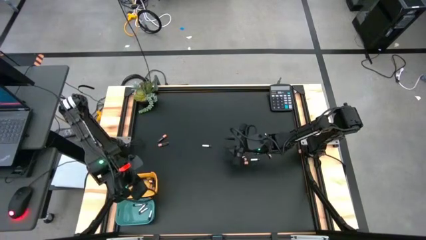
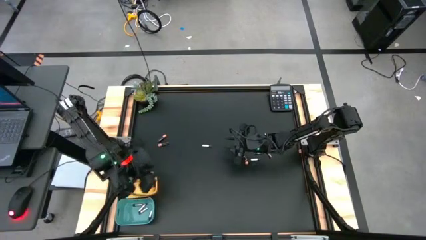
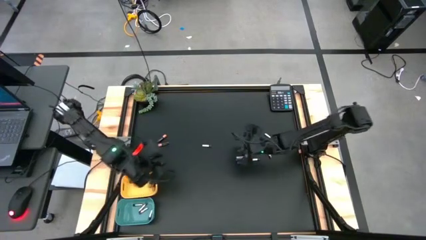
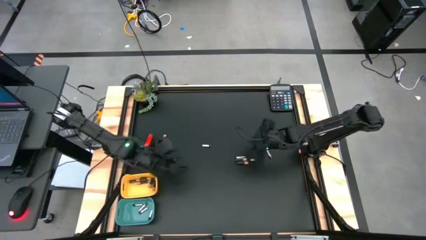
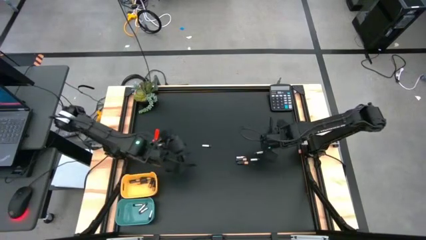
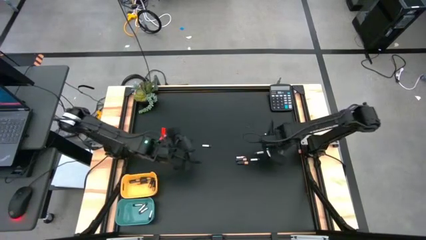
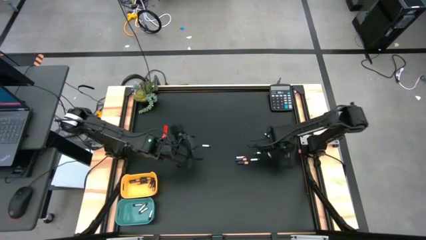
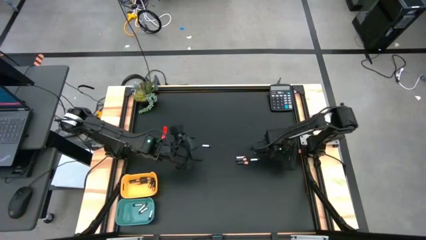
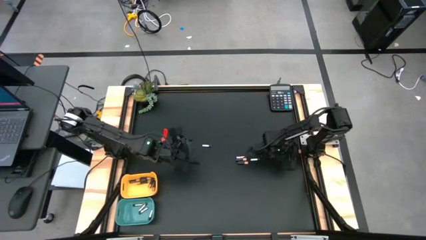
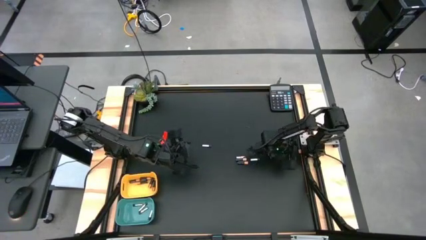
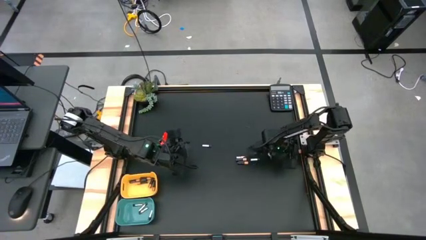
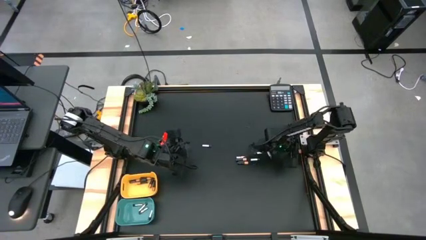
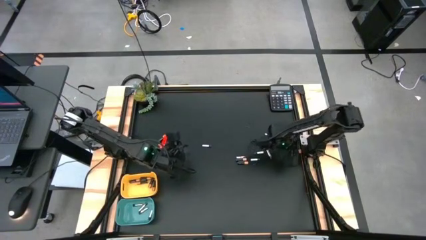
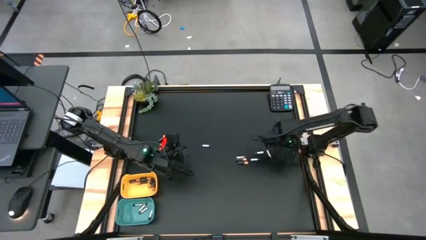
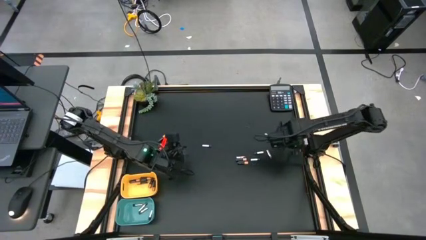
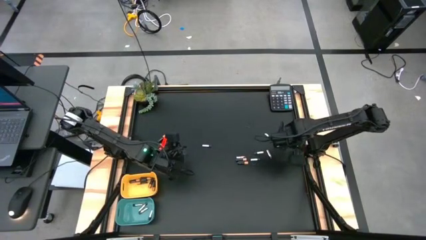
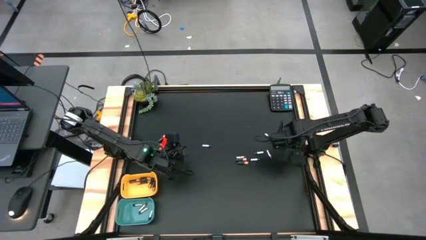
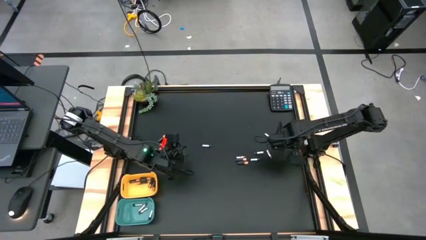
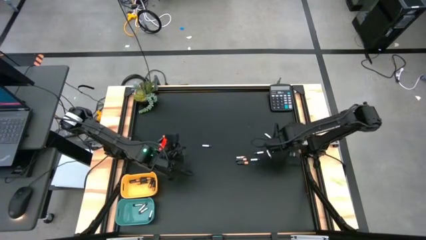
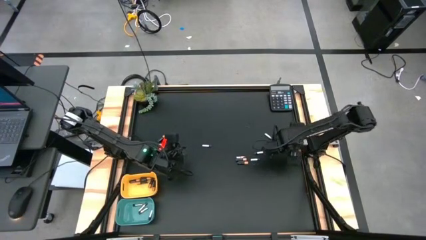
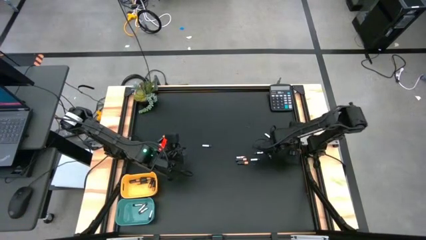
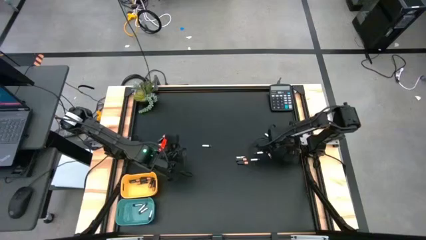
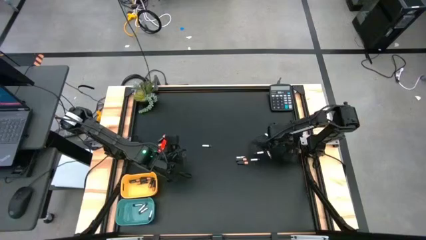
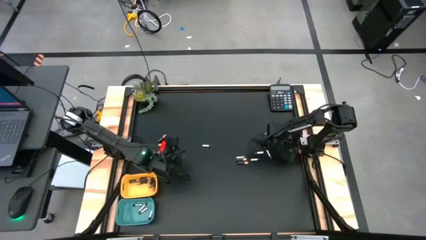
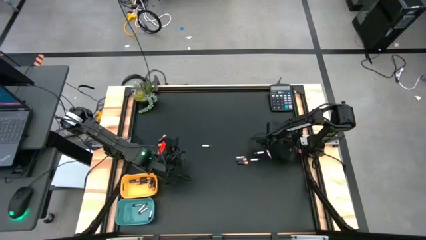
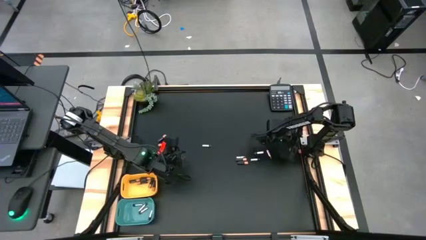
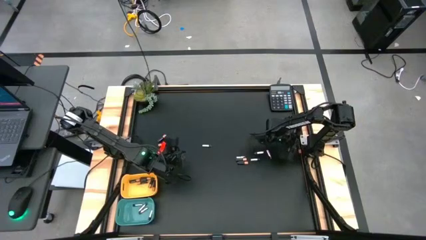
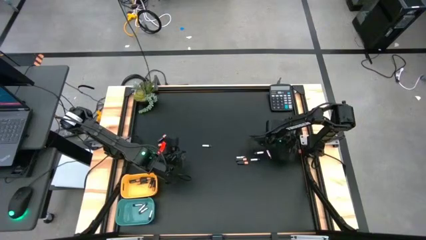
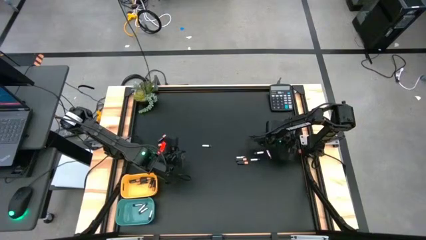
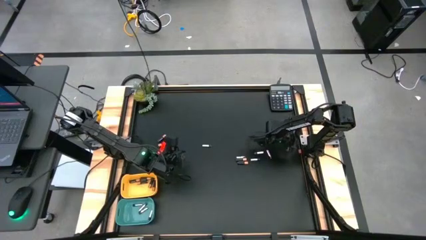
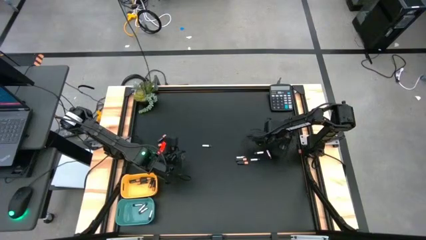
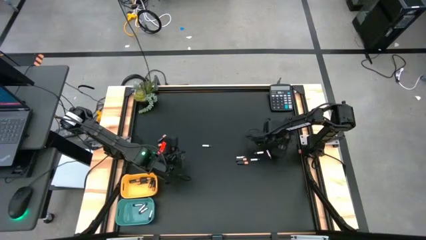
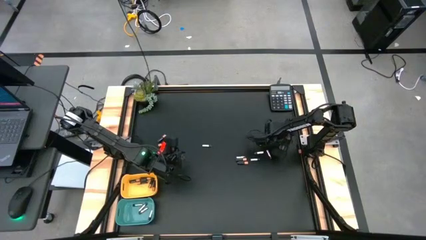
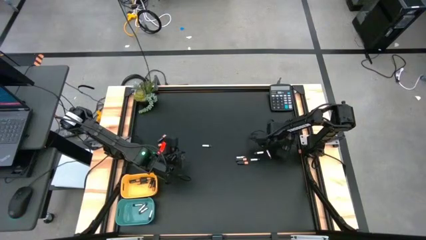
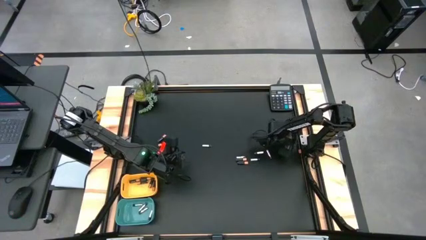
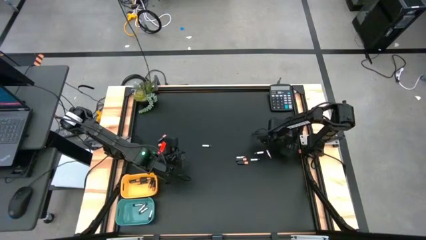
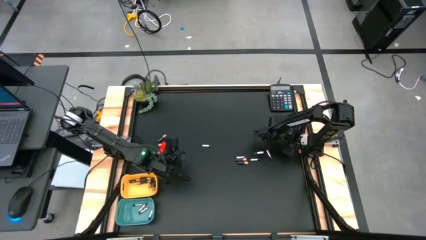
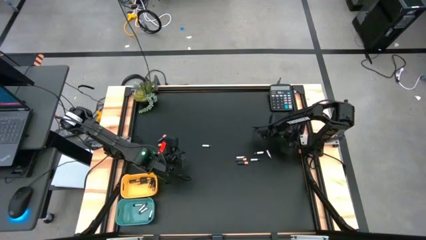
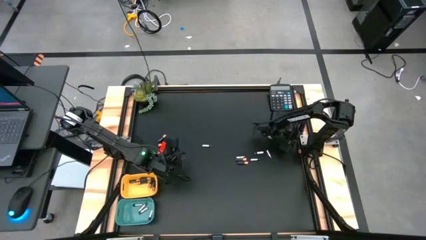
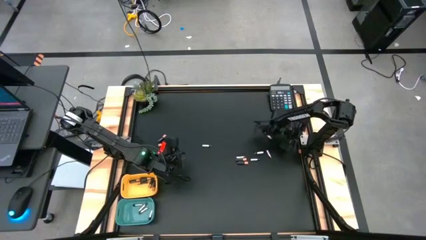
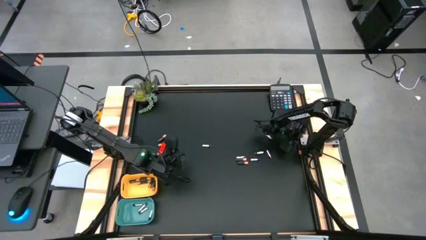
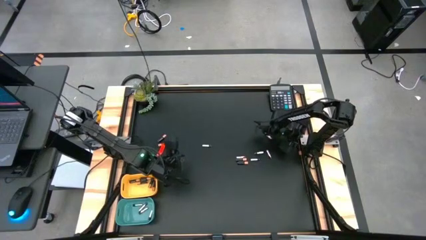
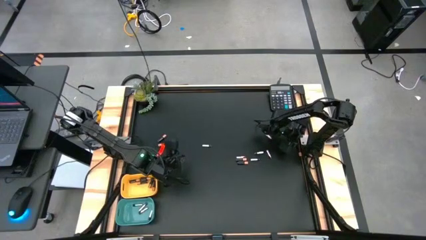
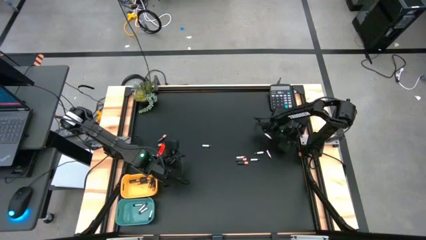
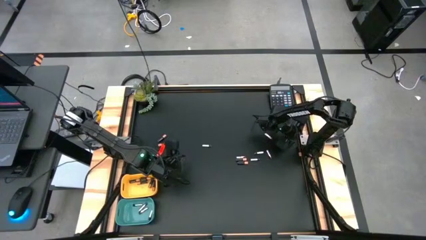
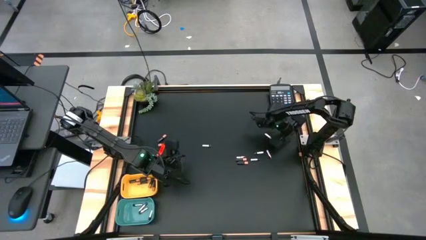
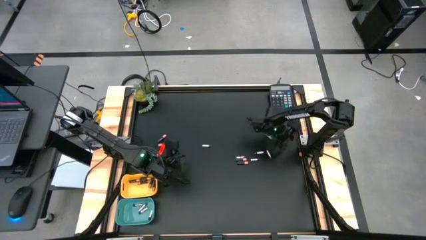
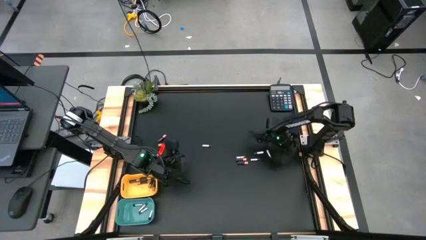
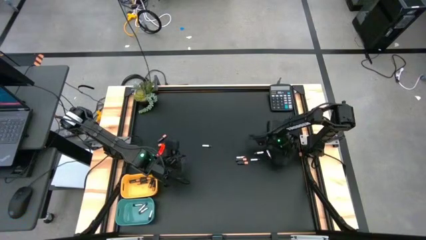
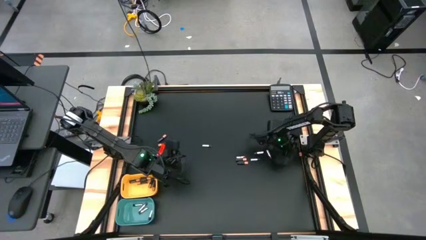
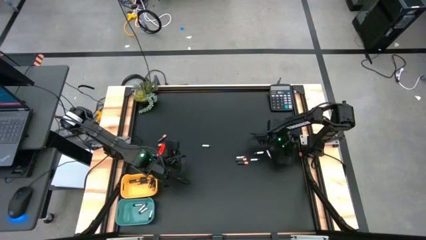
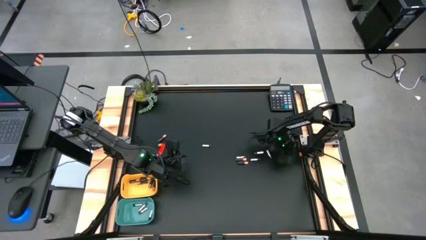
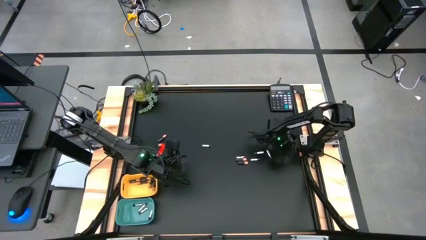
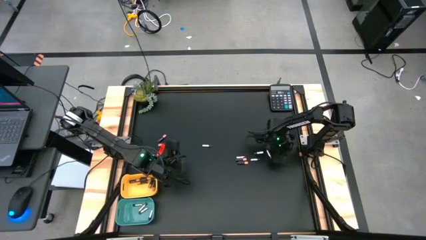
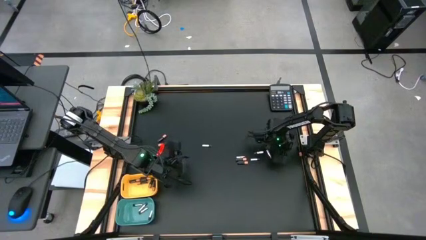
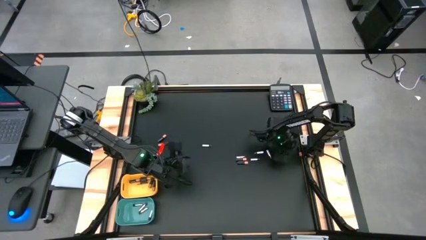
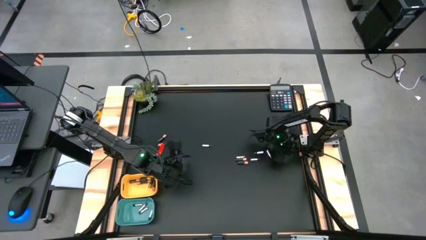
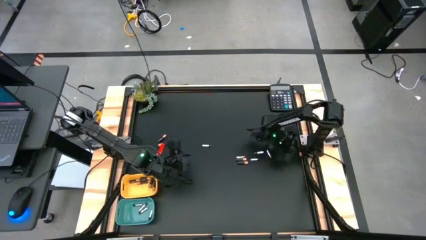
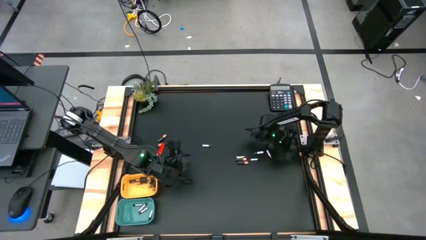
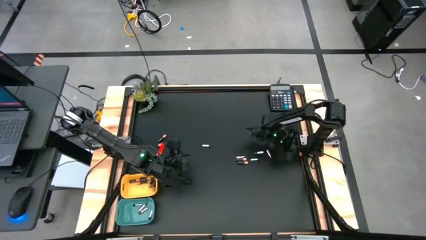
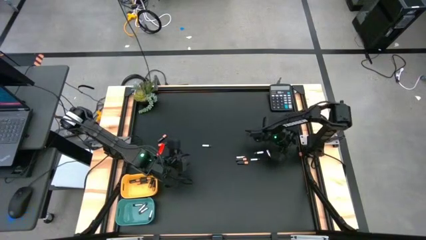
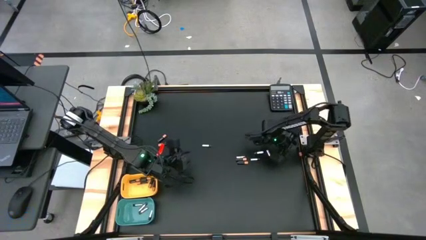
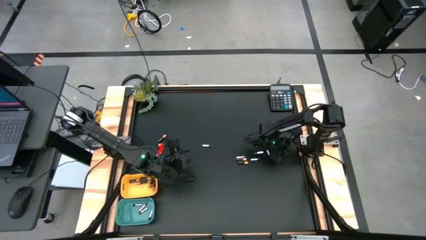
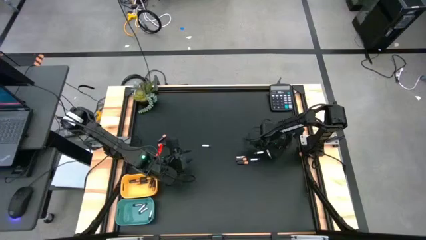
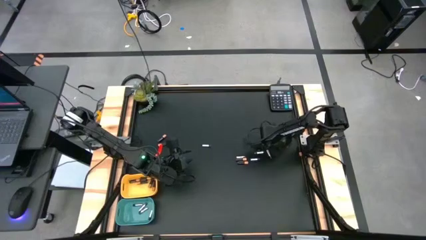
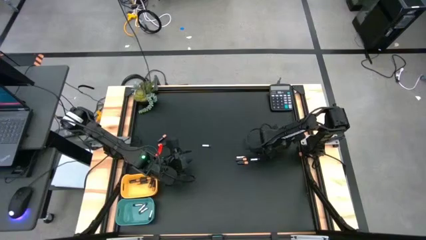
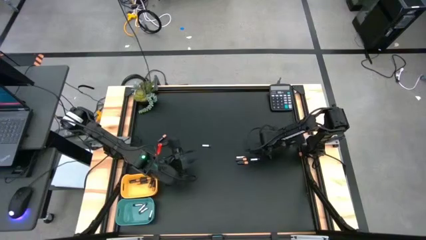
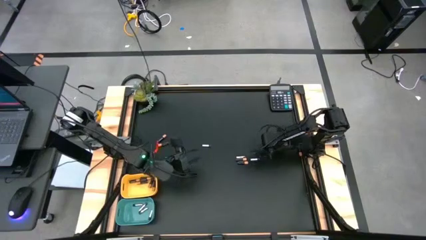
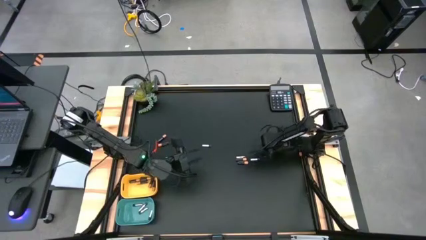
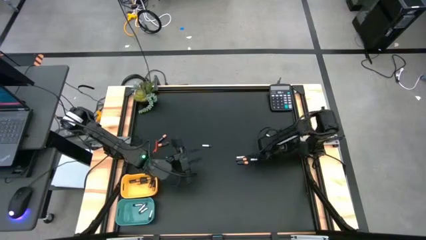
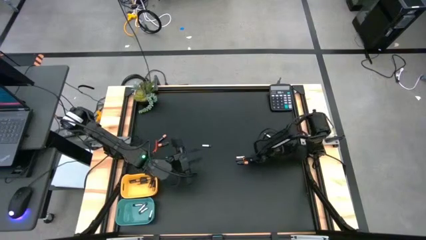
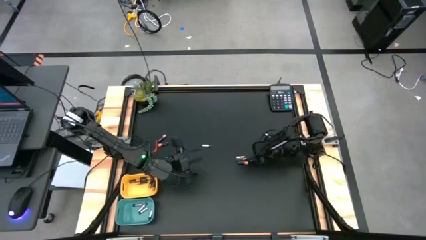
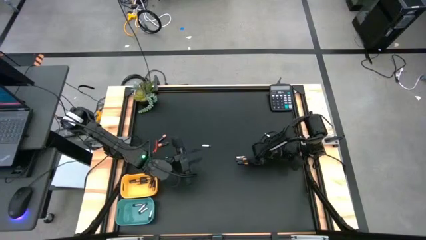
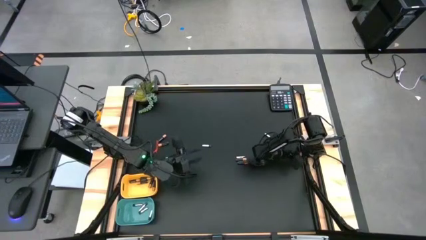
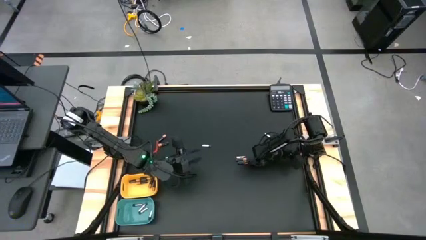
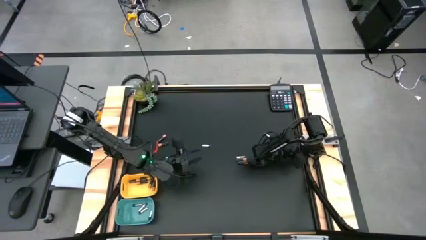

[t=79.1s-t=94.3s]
Task: Sort batteries
Put the black battery into the yellow bin
